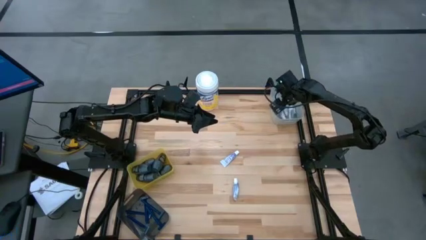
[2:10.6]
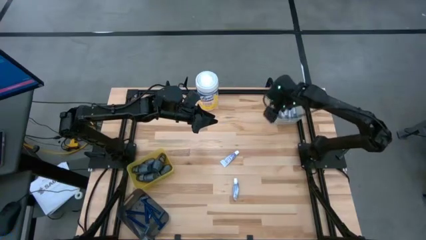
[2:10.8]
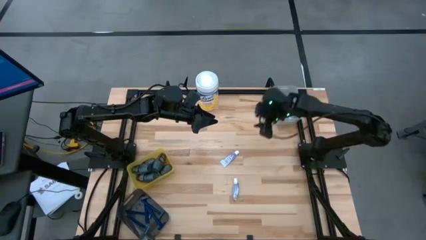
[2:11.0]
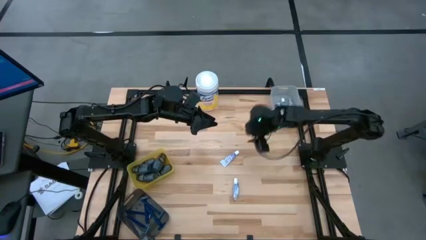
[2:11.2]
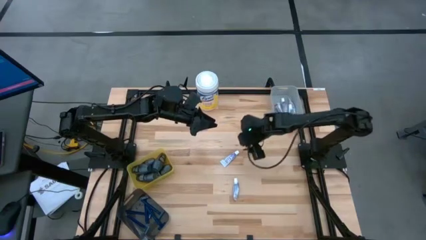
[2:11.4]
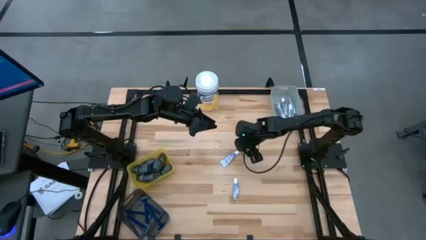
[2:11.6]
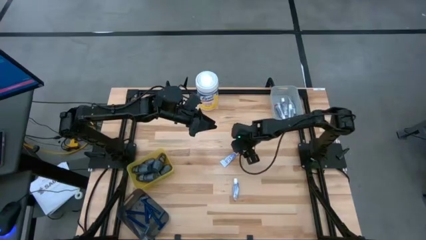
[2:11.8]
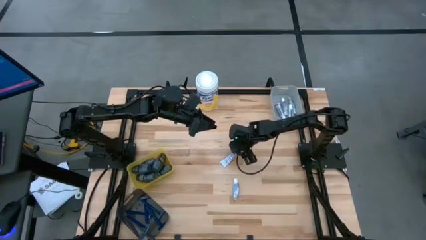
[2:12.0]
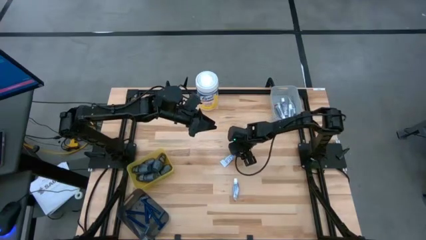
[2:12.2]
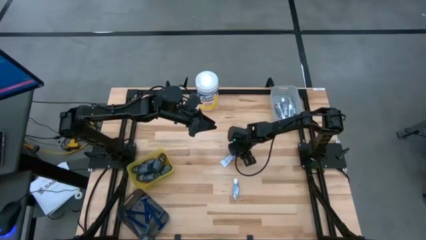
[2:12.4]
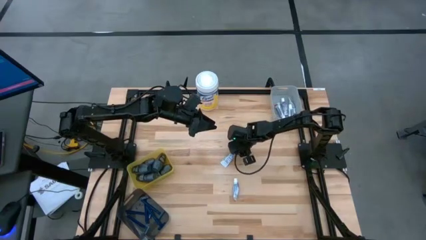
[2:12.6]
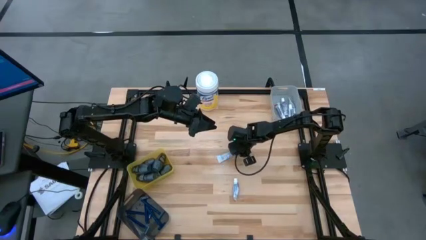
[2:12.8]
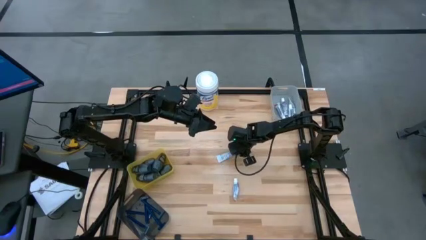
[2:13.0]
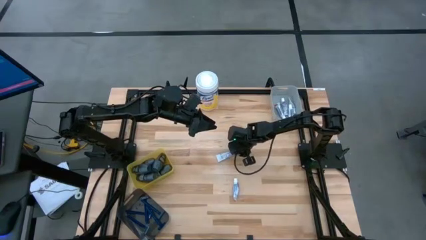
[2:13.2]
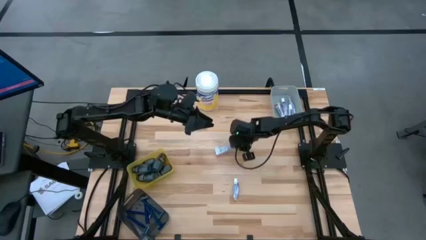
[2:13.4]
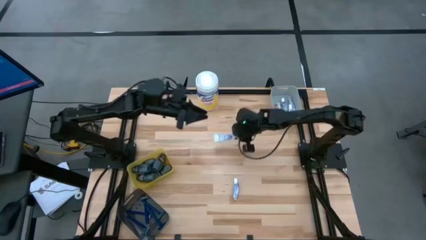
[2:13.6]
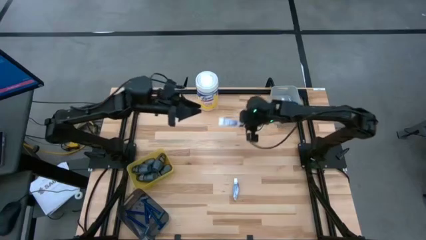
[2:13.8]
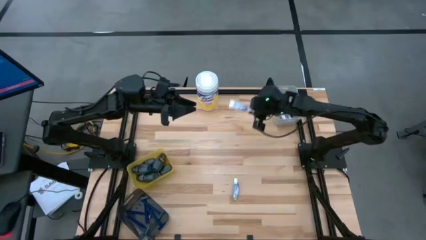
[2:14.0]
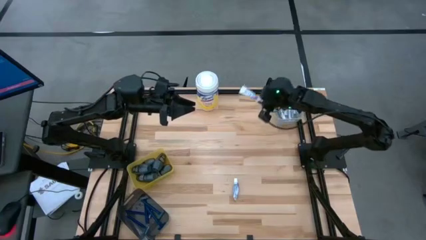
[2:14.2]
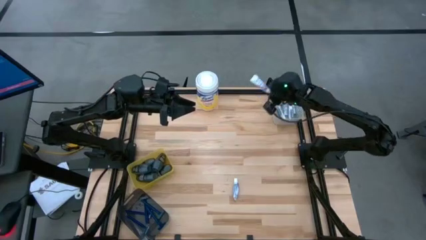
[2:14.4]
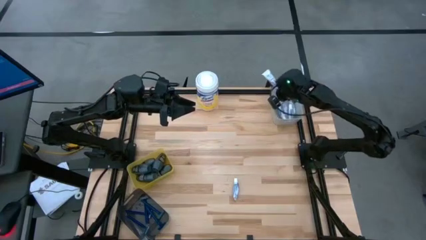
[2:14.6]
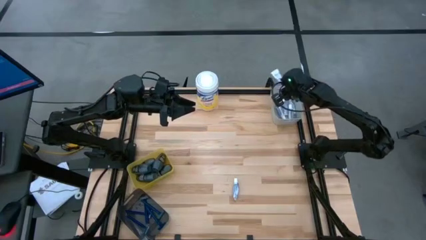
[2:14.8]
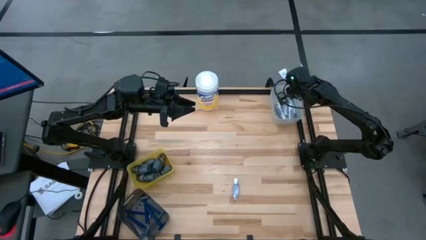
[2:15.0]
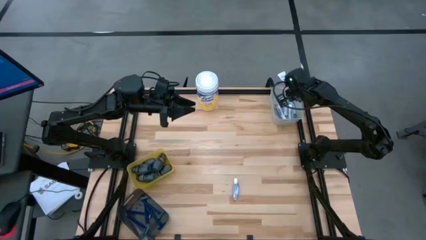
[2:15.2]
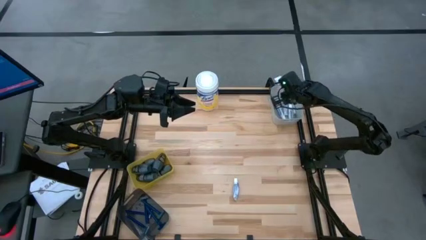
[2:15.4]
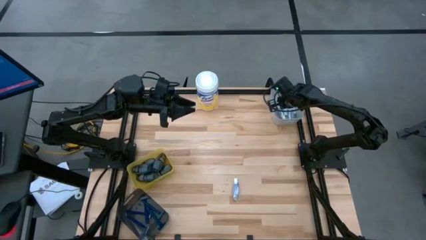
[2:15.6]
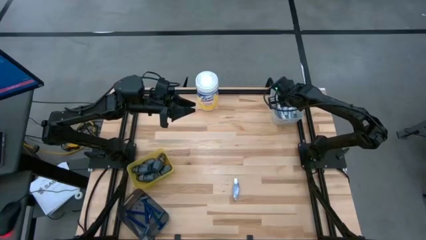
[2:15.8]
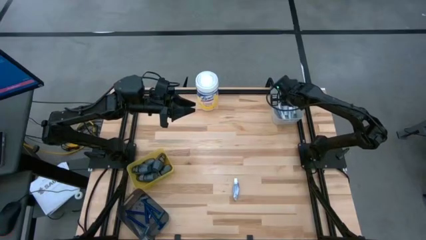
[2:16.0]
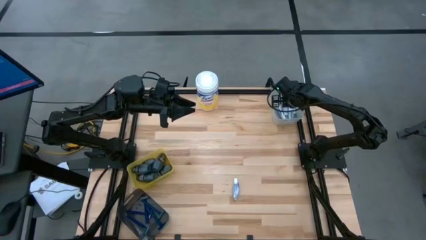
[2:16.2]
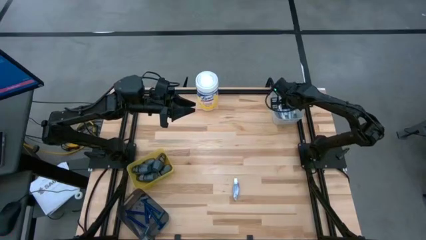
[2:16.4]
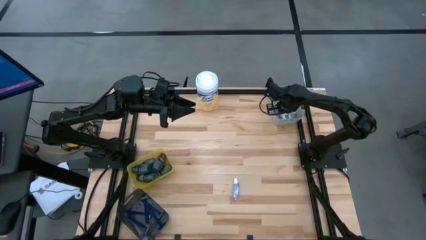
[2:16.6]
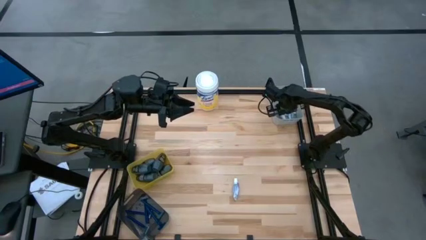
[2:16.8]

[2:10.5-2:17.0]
Task: Pick & Place Travel size toiletries
Put the white toothpaste into the gray bin

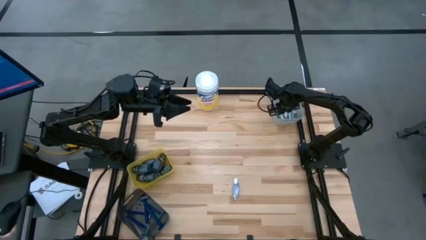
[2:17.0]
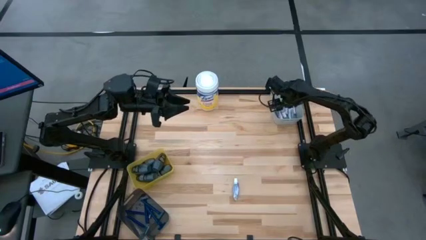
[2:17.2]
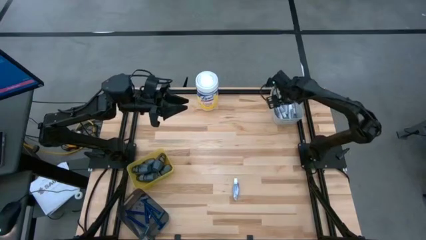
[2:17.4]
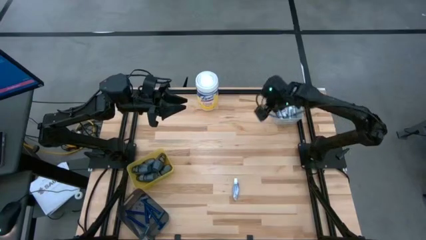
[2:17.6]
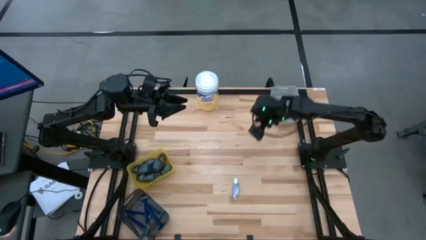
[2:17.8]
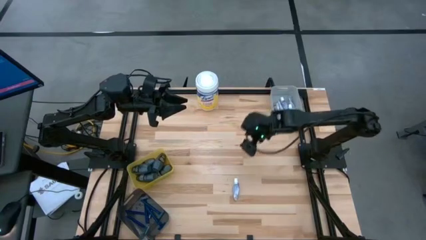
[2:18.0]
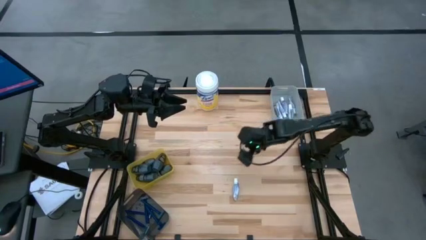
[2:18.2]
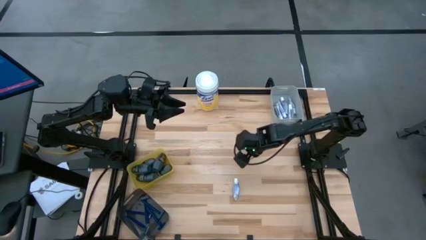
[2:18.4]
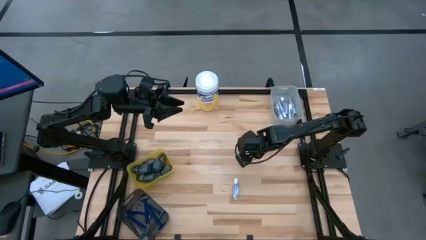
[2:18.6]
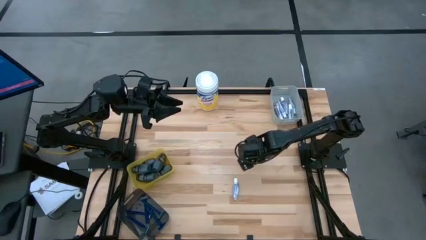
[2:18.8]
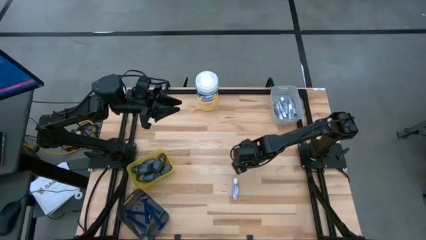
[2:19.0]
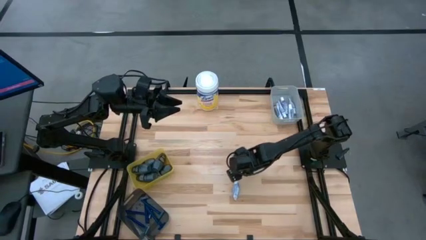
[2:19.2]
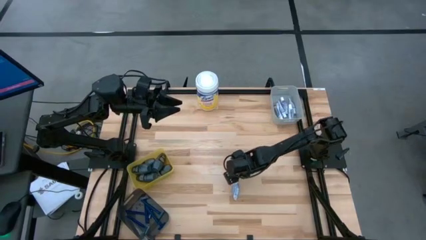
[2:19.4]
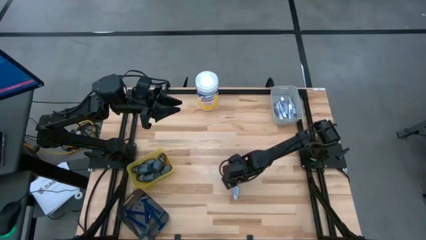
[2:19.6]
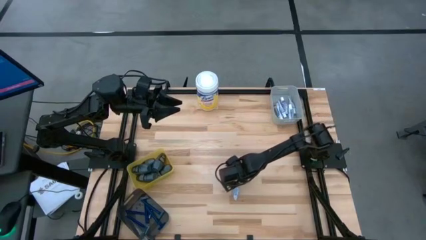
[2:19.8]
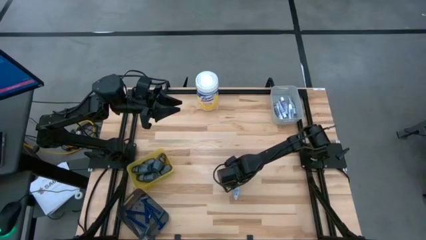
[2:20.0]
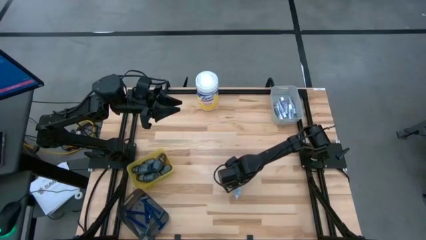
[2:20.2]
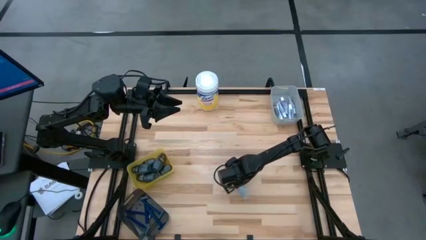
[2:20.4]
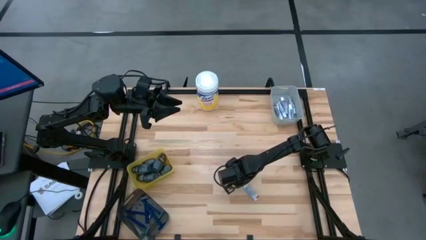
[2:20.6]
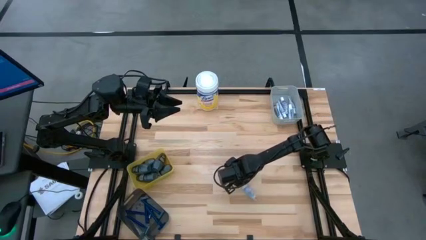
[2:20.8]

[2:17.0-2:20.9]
Put the white toothpaste into the gray bin

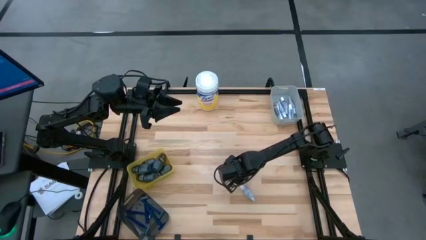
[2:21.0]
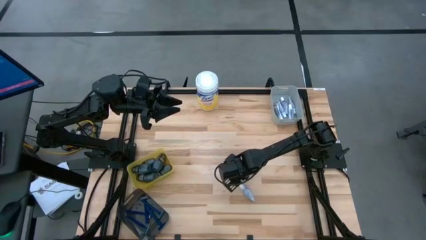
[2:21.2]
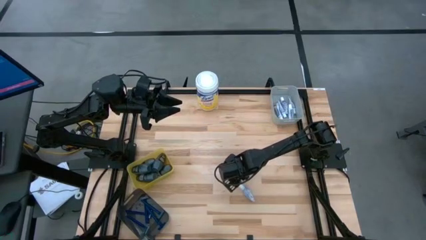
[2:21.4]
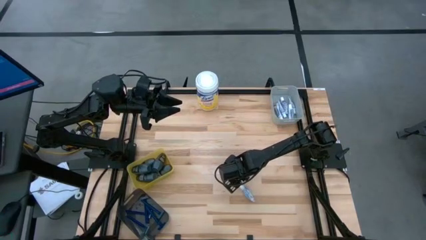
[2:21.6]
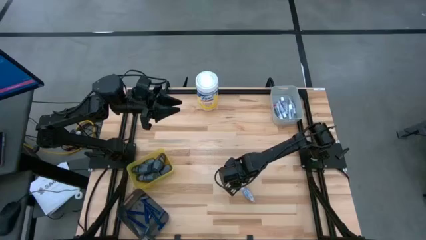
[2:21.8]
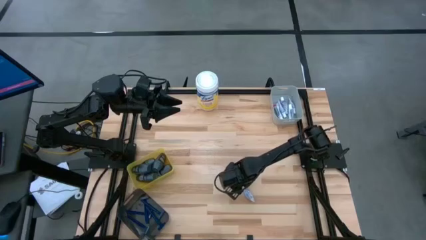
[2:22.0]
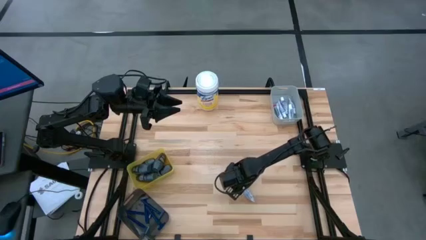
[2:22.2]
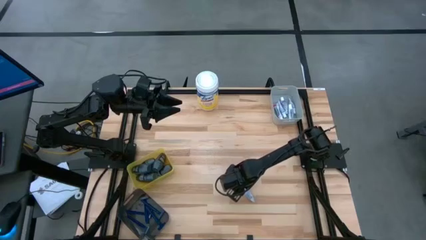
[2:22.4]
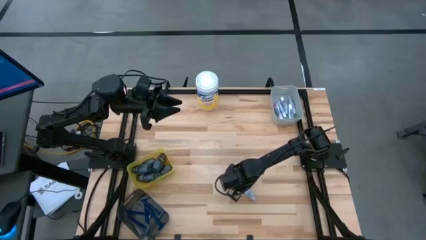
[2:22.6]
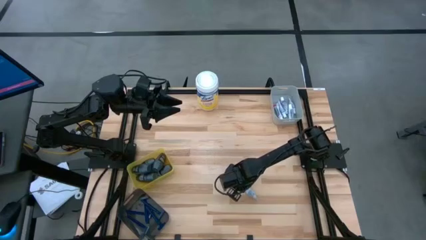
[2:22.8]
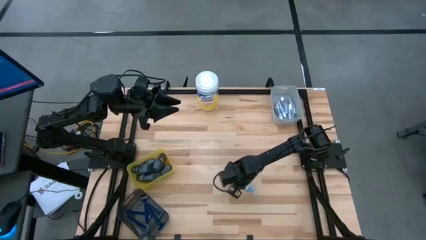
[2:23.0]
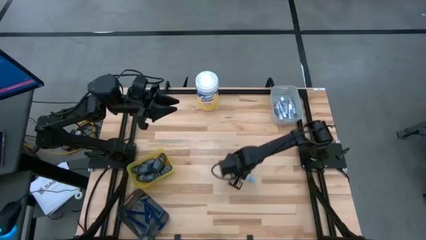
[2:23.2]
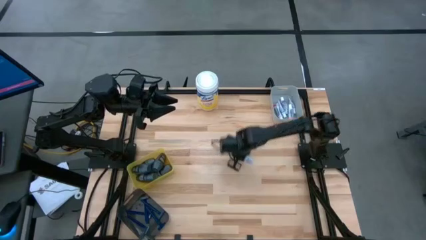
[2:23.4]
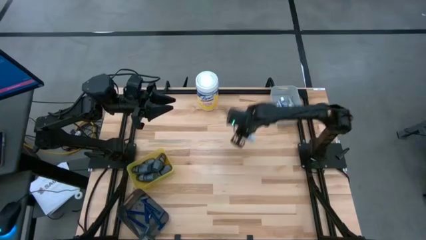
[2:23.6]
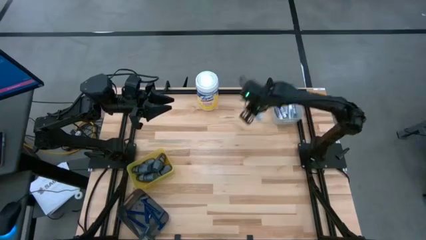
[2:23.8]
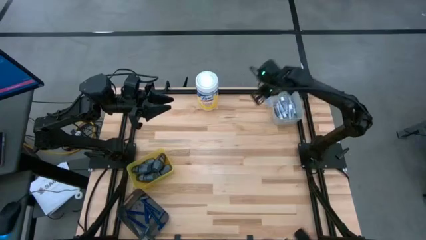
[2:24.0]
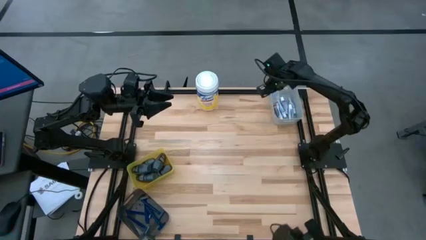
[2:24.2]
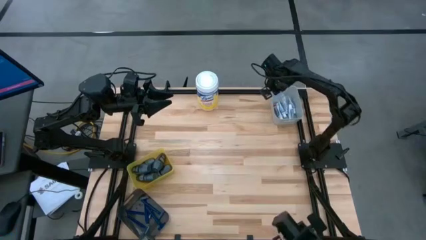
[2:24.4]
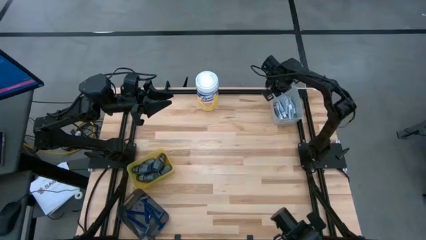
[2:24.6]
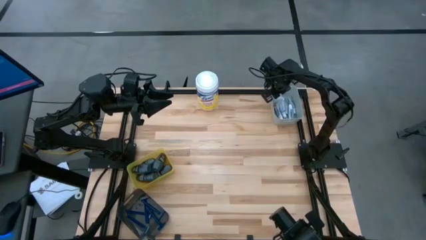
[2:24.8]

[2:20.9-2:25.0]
Put the white toothpaste into the gray bin

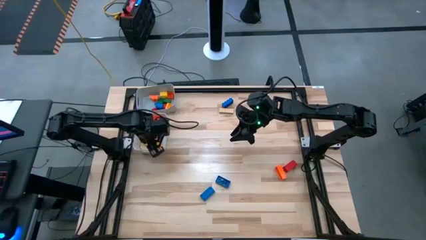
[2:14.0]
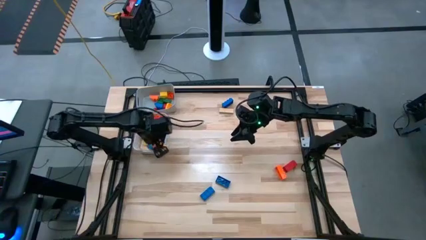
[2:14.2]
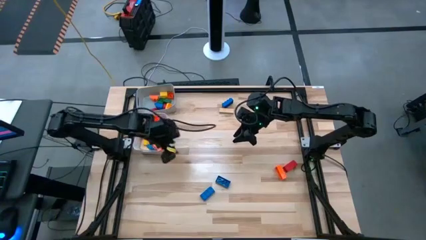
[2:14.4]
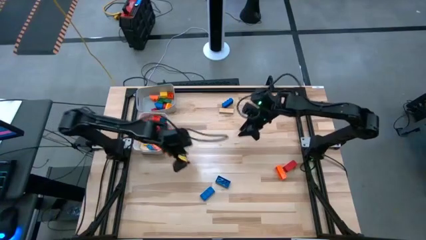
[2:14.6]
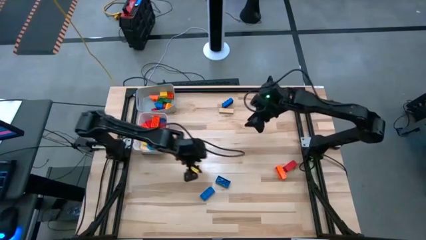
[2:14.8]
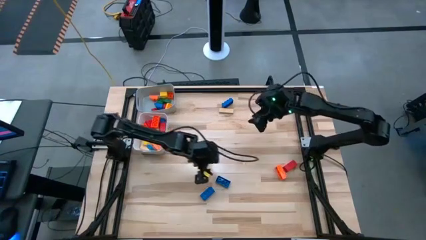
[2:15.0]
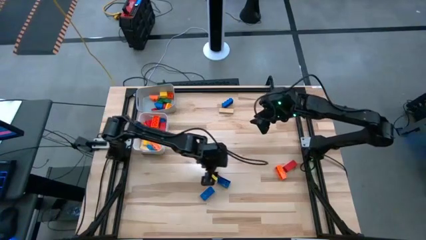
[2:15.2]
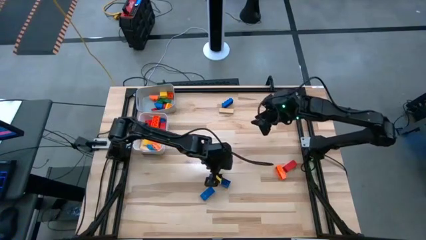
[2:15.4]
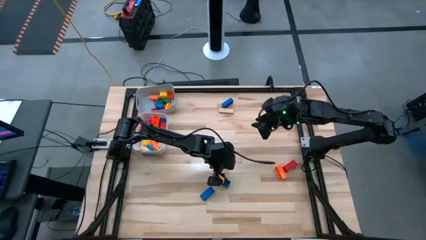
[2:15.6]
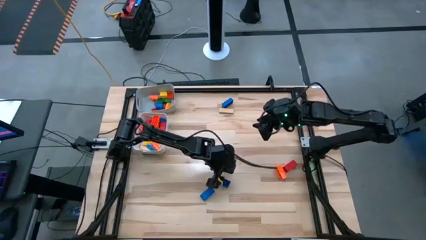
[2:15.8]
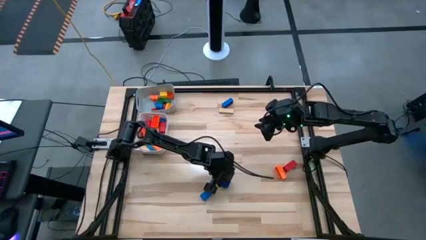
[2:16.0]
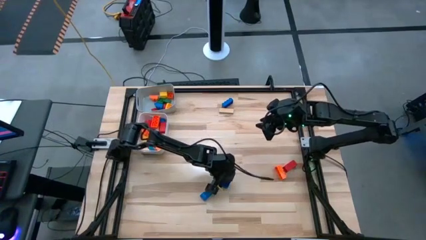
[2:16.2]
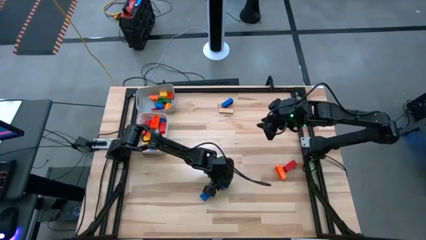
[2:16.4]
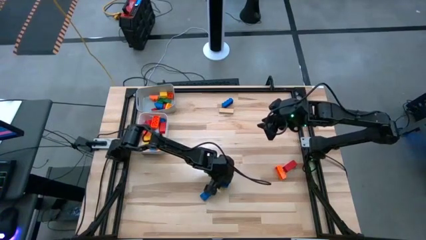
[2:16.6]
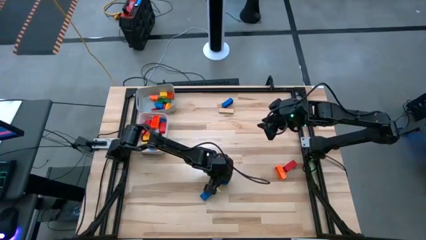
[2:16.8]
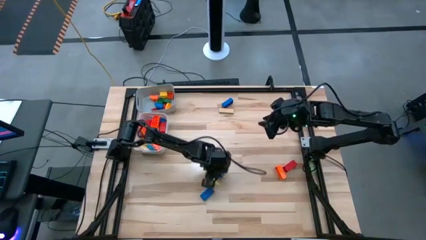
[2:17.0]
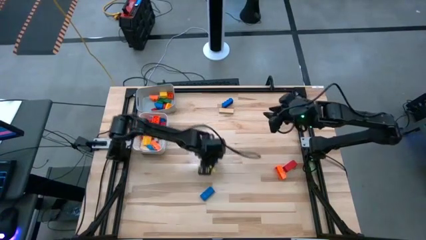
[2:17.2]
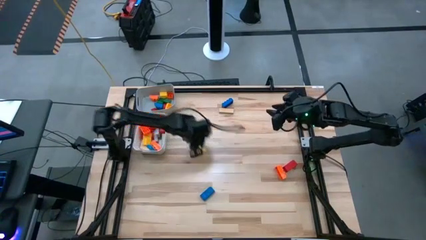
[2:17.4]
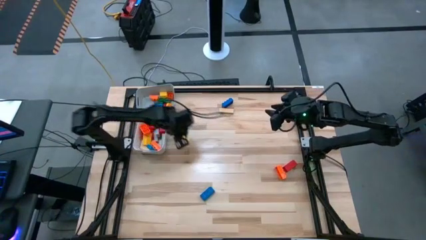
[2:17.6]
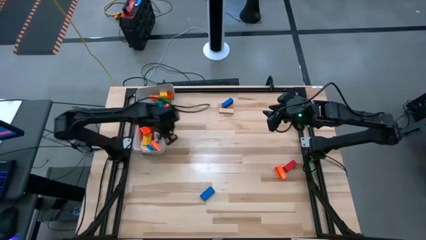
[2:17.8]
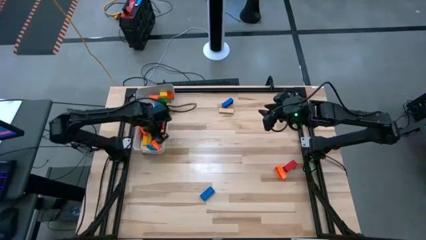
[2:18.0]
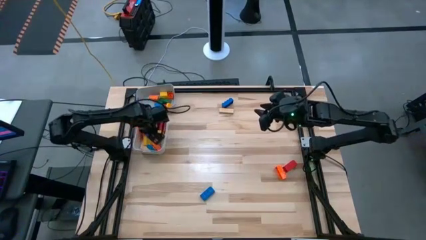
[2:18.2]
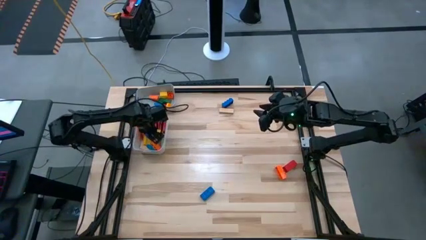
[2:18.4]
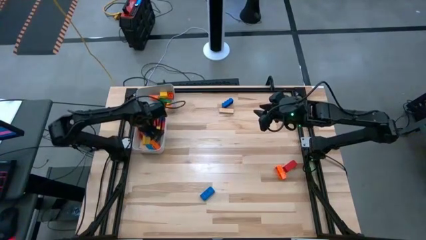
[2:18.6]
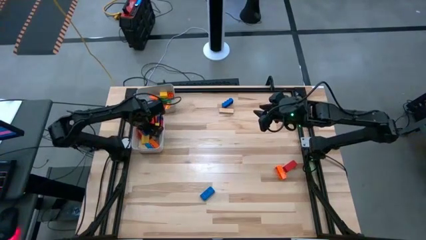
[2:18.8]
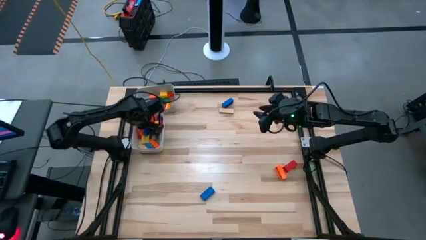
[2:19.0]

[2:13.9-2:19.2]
Task: Sort blocks by size
Put the large blue game piece into the white bin
